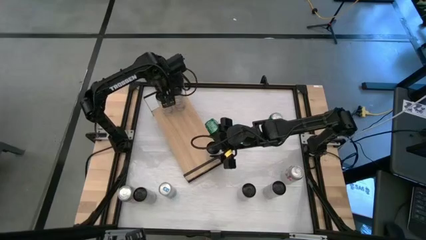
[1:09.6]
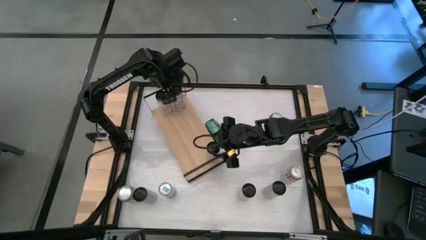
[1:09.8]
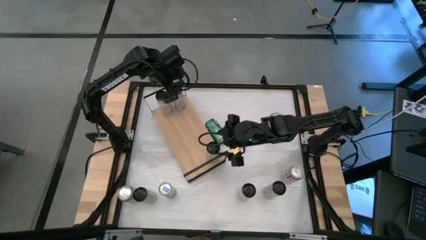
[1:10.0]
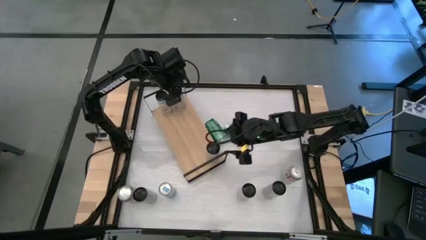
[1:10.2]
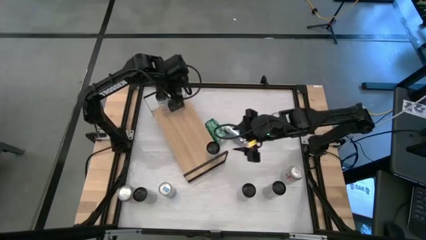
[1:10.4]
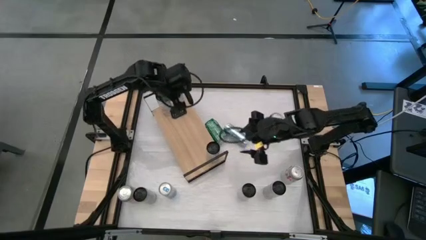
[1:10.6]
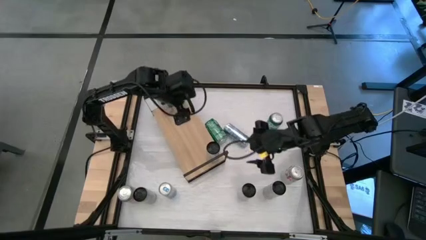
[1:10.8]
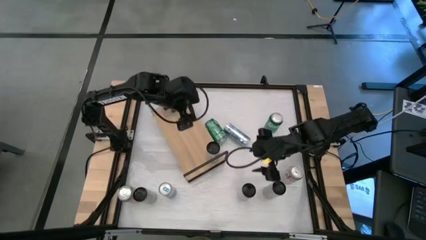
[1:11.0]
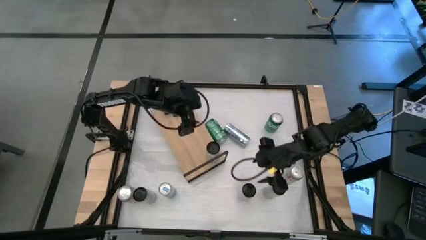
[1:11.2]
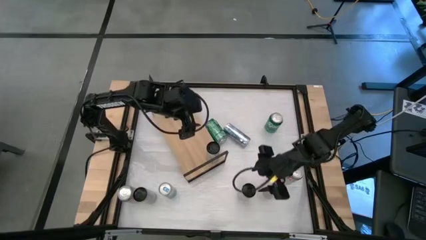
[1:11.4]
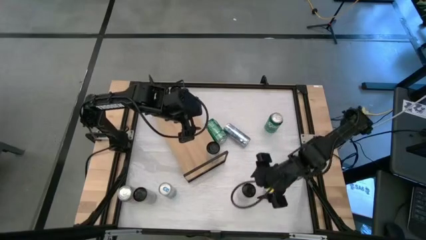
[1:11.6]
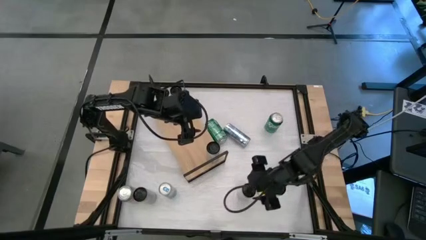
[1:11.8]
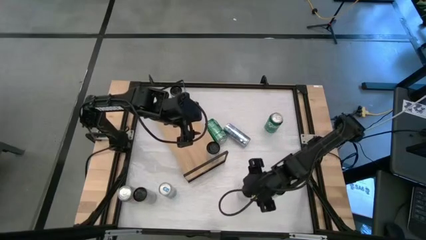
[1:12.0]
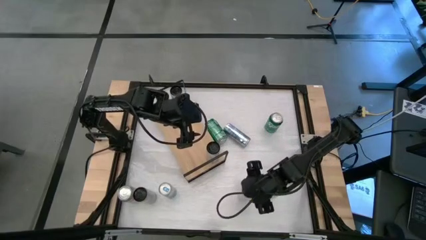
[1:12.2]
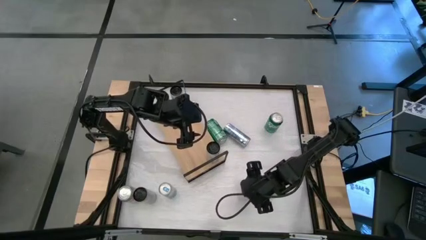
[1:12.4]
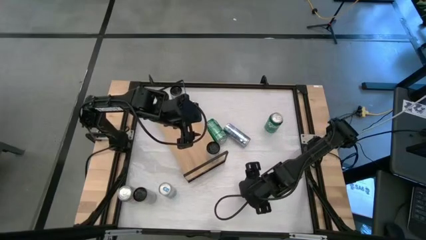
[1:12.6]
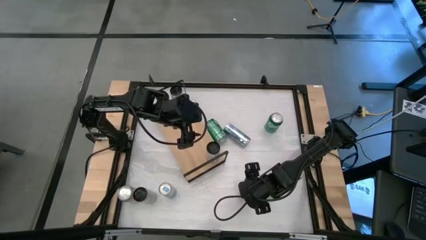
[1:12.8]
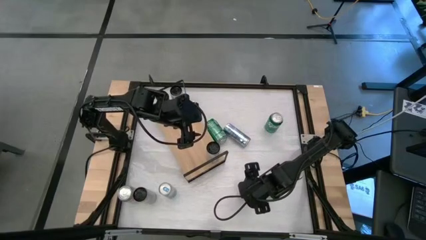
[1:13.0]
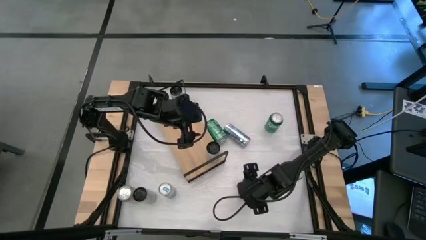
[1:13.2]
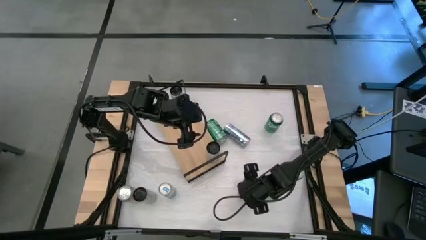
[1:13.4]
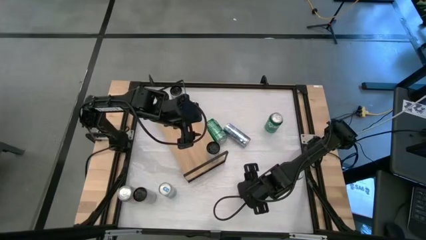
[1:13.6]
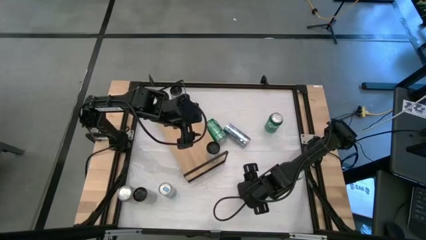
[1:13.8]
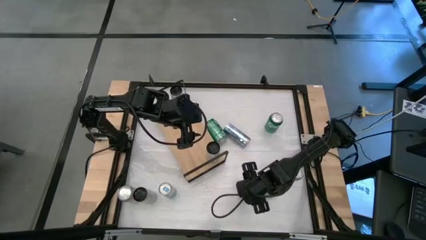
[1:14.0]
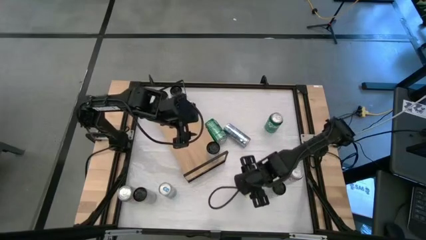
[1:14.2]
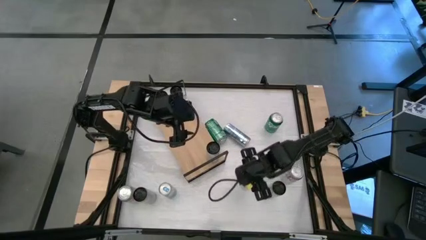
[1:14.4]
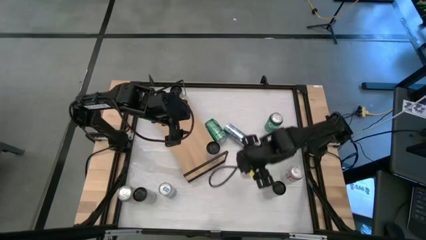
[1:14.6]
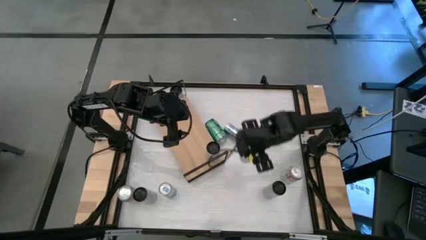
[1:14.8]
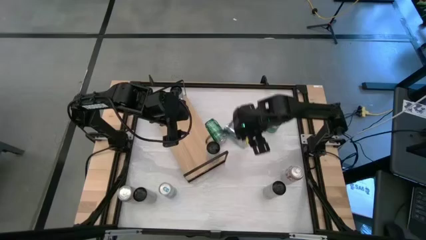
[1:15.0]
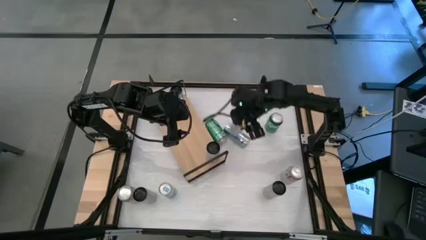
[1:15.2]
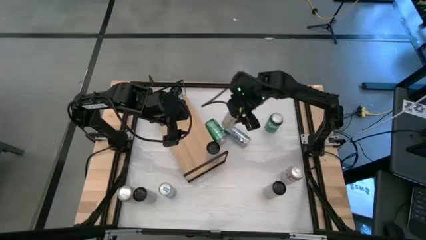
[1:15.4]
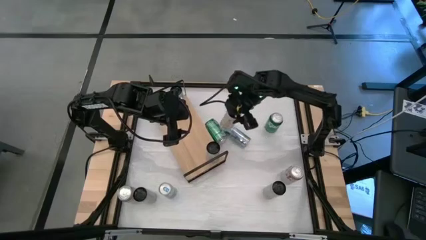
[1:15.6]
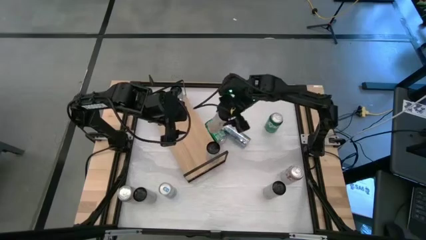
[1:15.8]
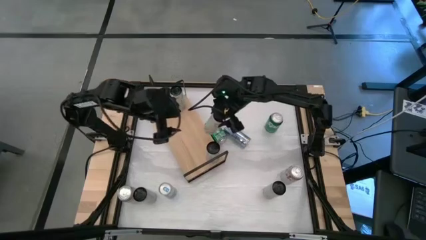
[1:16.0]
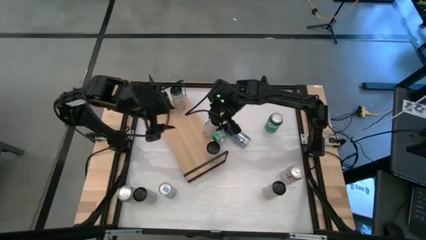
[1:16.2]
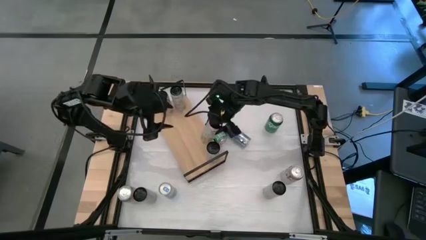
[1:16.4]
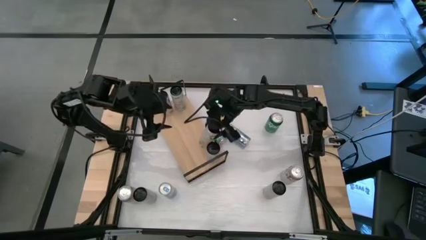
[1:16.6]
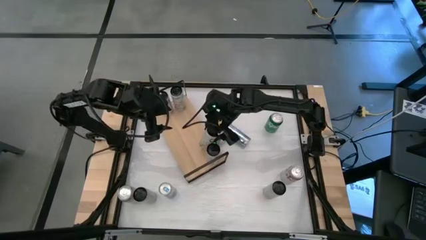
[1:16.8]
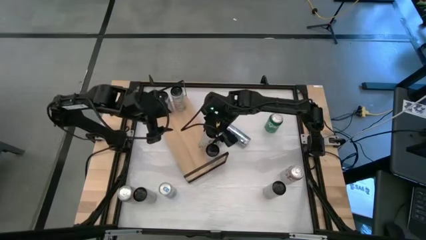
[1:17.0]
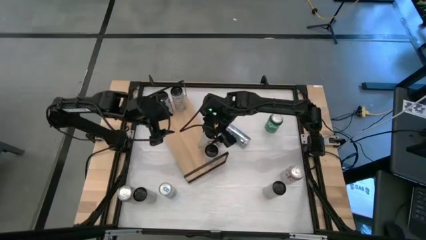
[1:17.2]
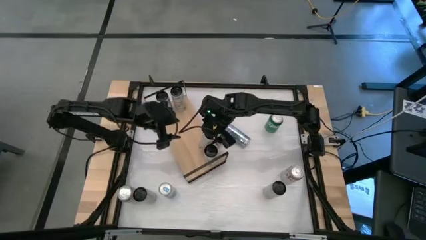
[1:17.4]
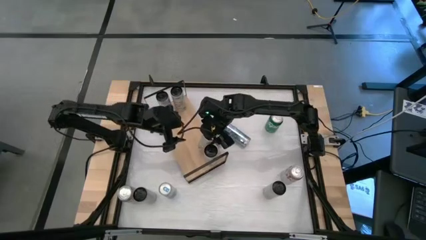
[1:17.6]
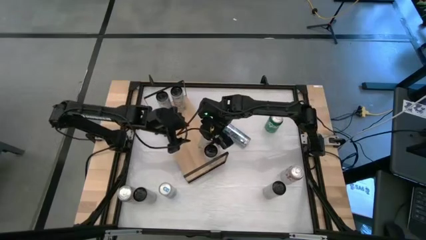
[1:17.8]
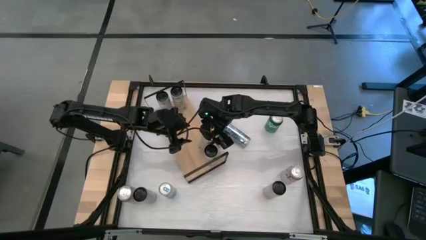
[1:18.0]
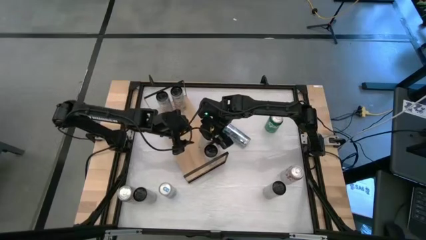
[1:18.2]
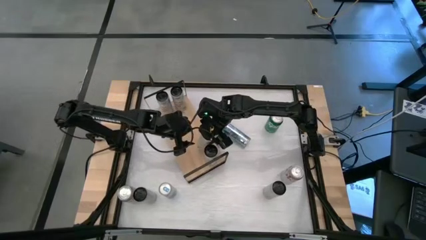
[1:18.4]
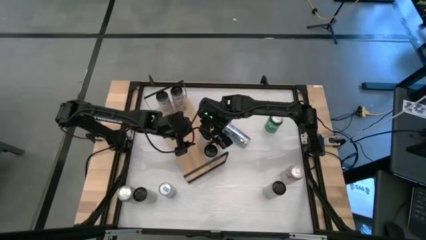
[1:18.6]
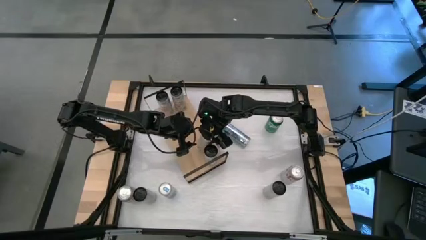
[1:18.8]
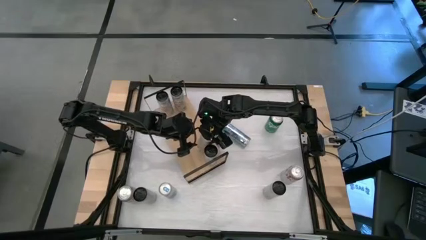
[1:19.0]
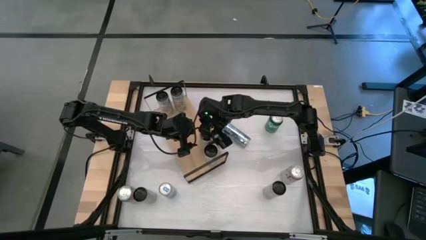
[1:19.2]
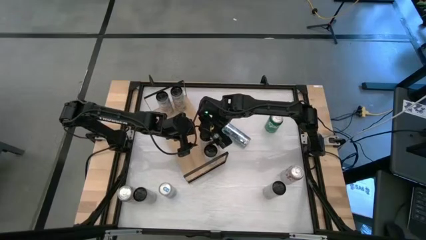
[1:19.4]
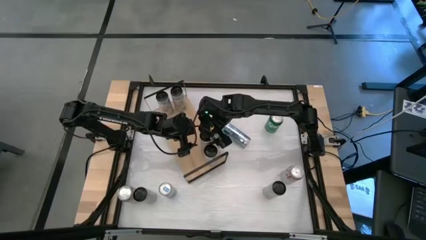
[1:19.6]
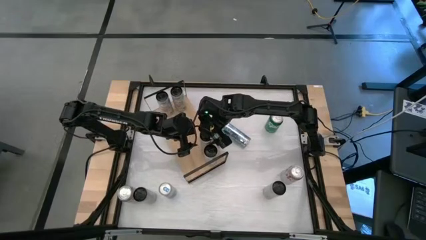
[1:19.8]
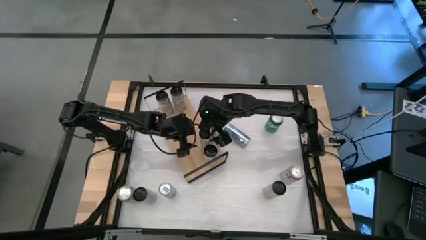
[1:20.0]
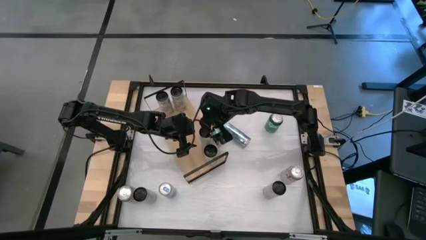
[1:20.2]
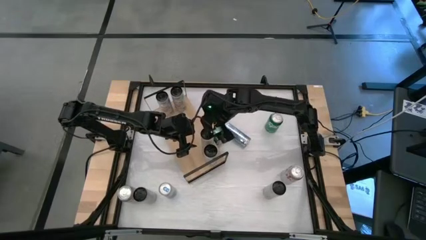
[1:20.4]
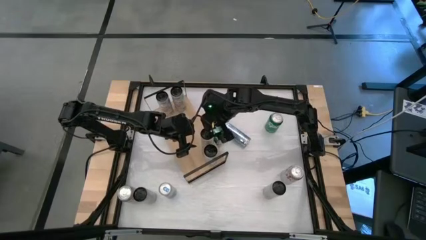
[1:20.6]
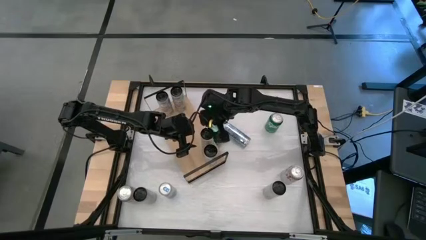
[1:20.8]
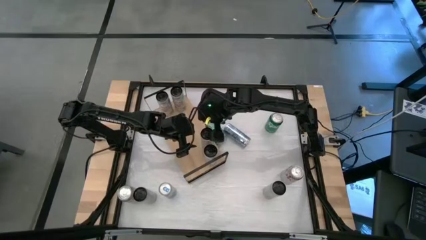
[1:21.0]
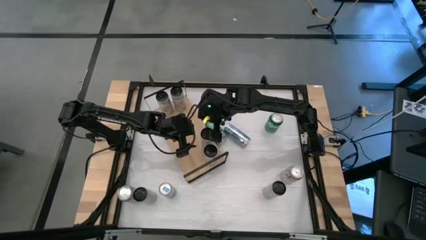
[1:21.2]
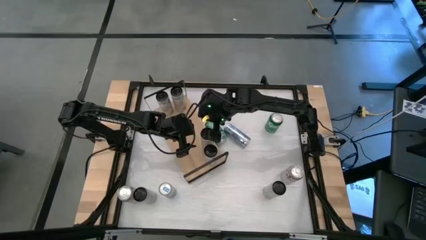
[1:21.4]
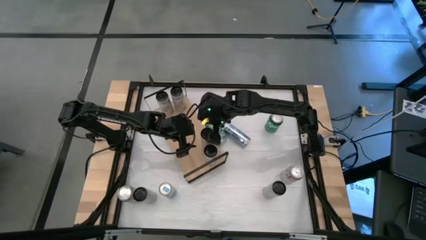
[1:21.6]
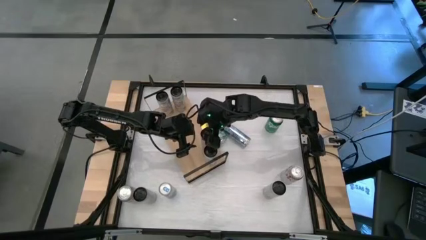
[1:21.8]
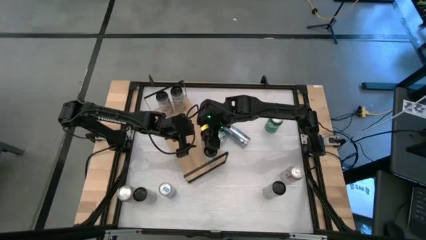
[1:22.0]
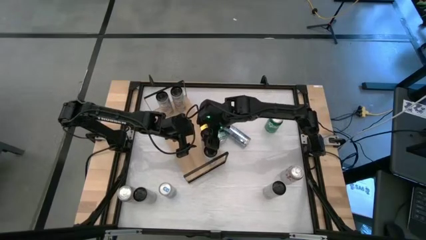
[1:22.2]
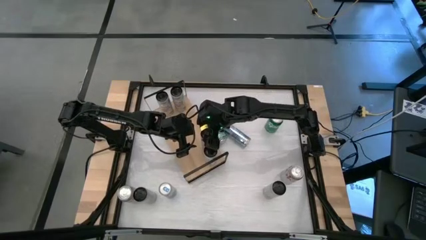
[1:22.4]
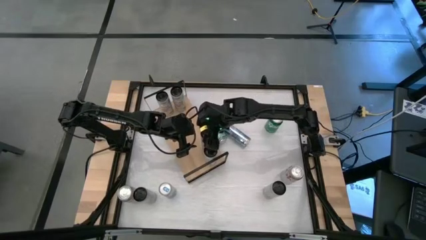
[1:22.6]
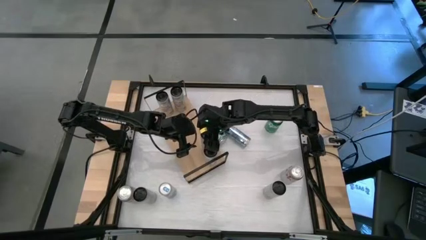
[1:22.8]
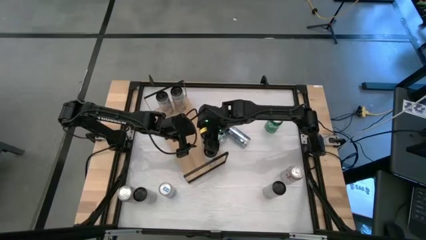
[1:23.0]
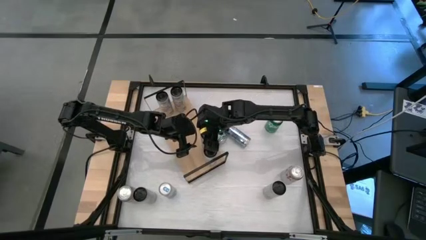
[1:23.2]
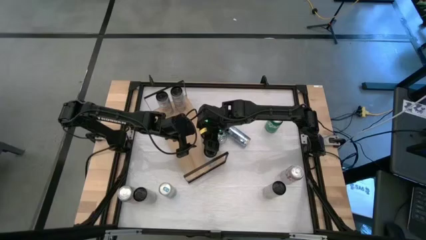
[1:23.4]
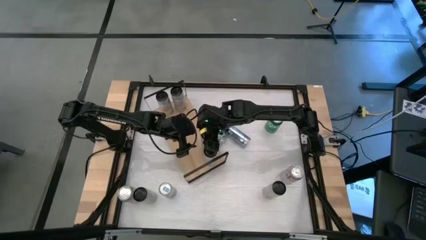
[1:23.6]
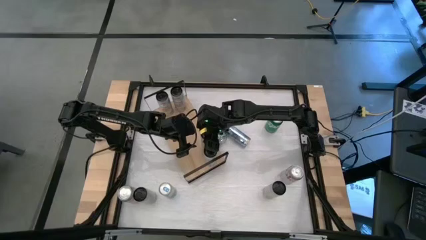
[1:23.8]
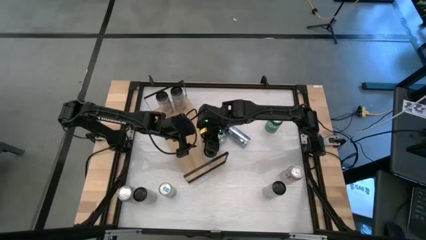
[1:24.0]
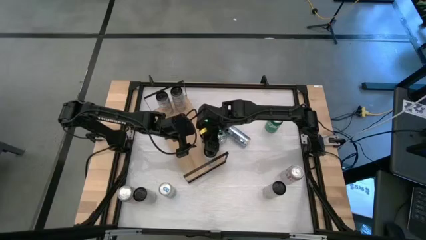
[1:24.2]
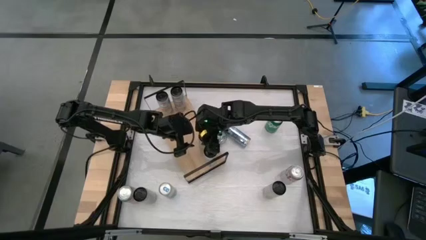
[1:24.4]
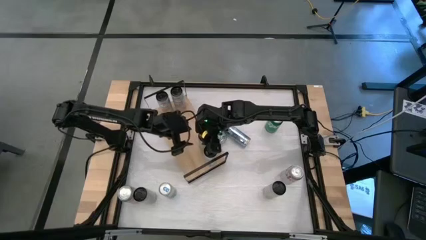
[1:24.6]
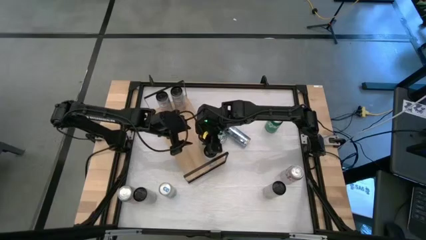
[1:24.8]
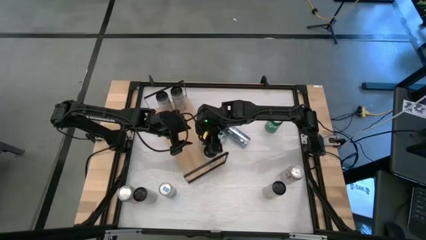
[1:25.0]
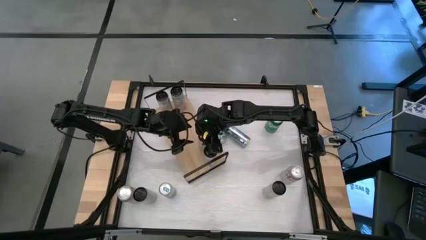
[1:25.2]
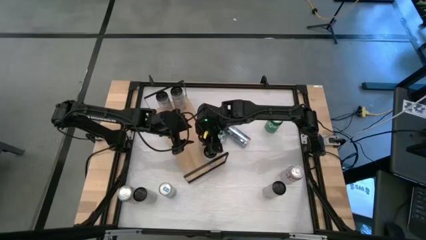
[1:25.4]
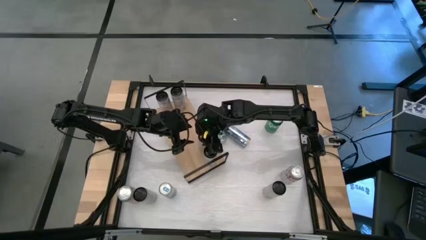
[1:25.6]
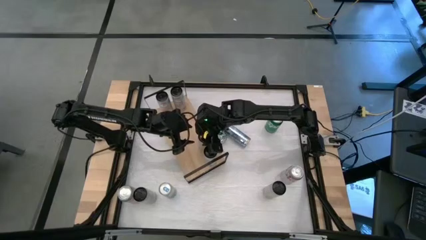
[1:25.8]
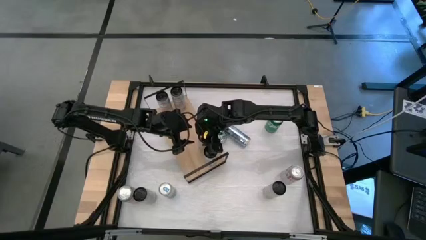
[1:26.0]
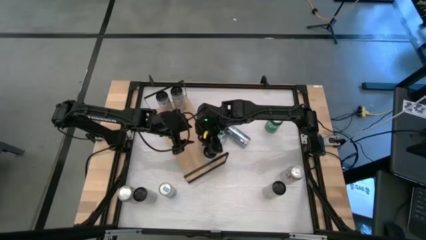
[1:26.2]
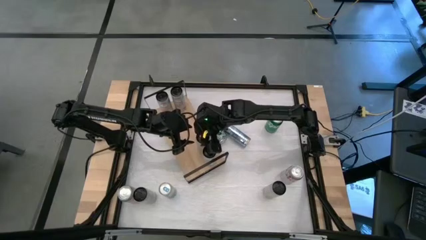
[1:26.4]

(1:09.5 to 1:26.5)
Task: Place canned beverage on shelf
Put the white yellow soda can on the shelf aligned with the other white yellow soda can
